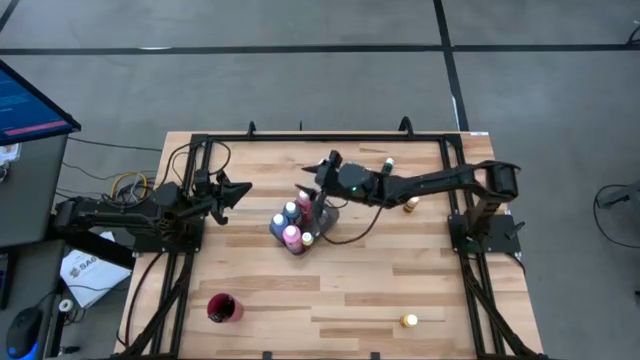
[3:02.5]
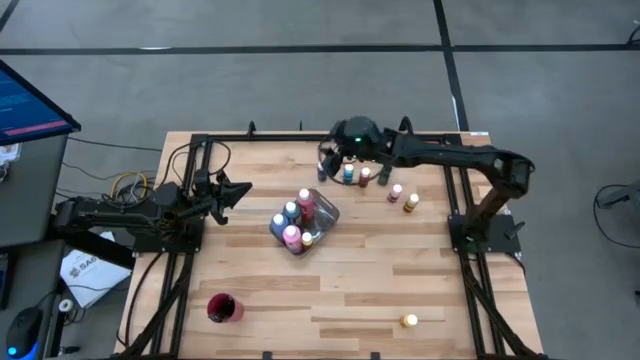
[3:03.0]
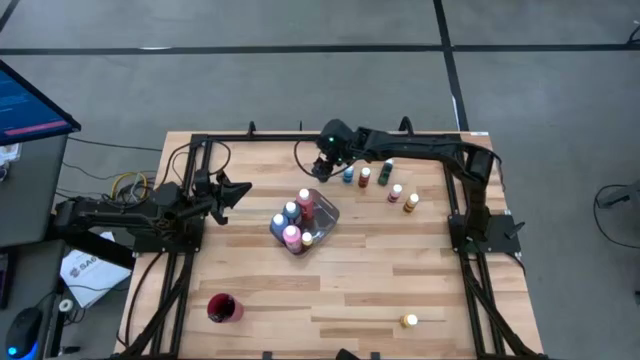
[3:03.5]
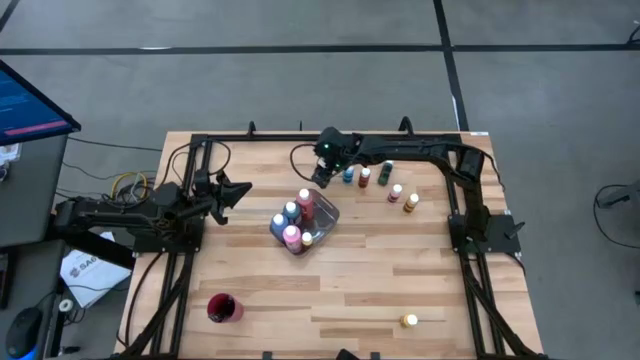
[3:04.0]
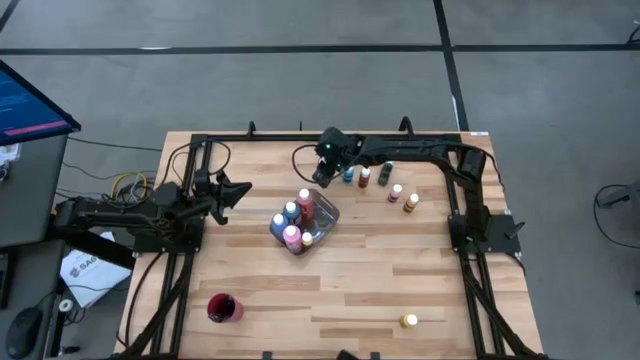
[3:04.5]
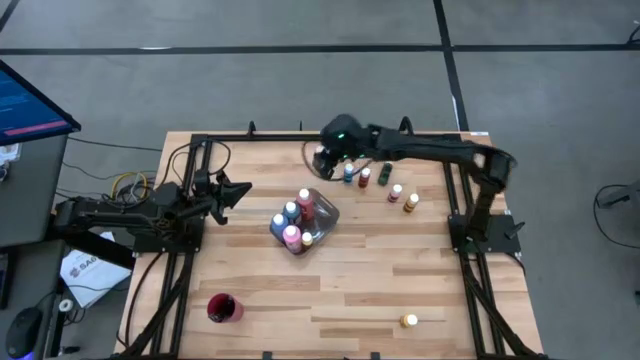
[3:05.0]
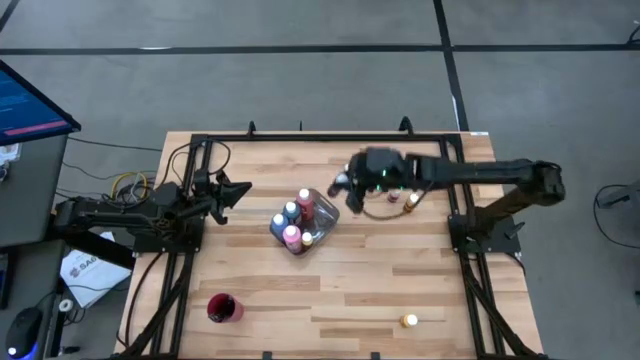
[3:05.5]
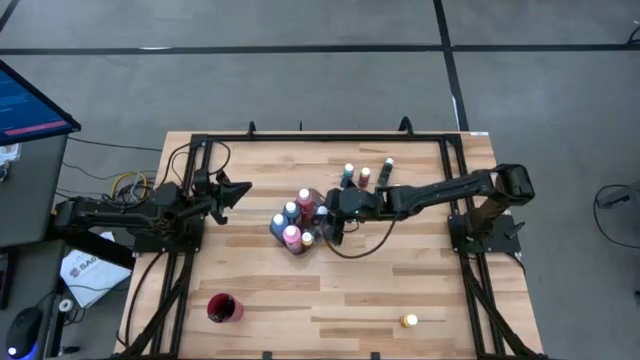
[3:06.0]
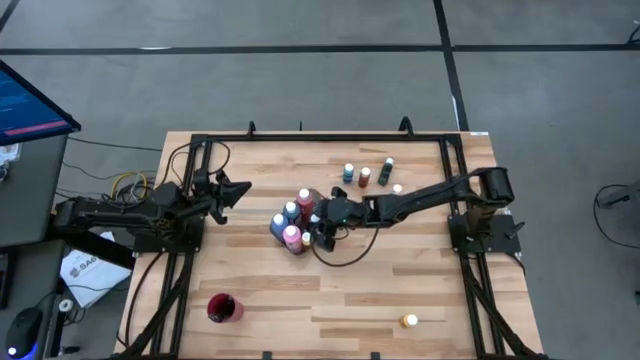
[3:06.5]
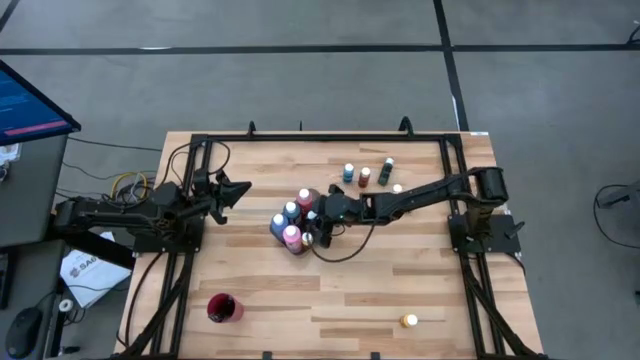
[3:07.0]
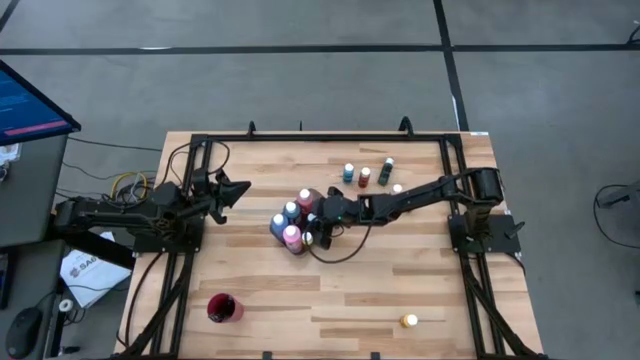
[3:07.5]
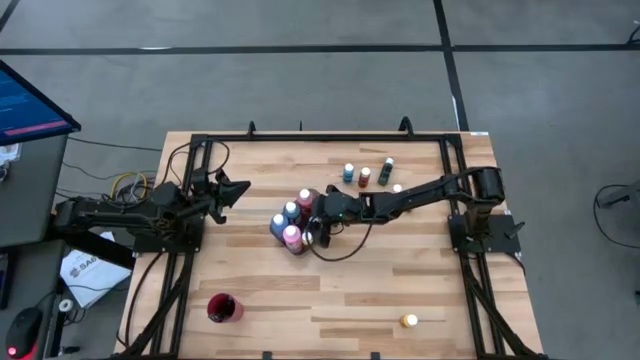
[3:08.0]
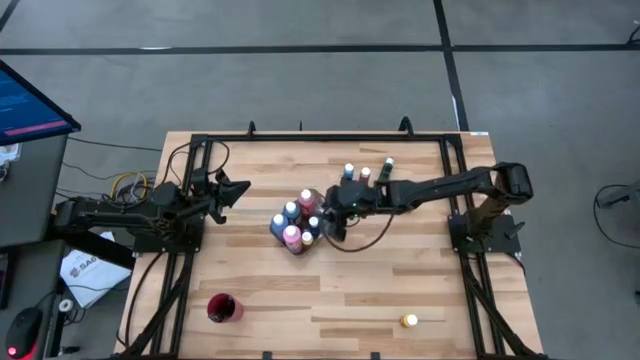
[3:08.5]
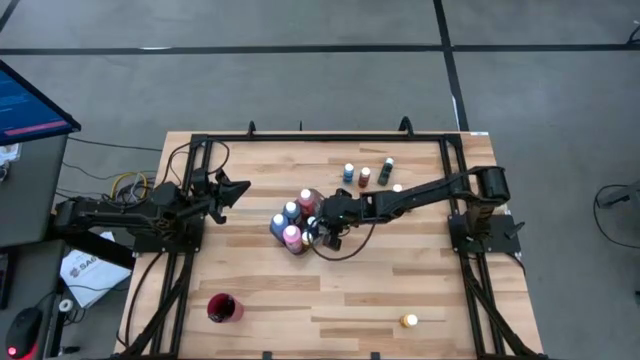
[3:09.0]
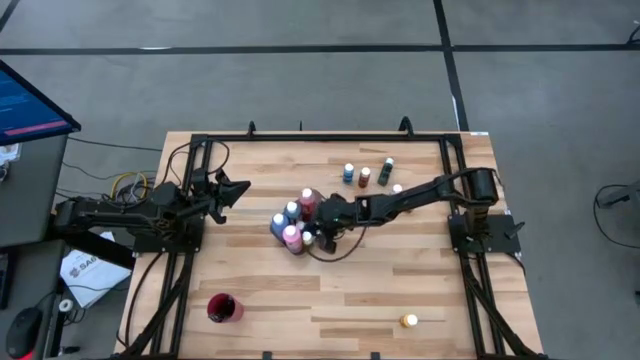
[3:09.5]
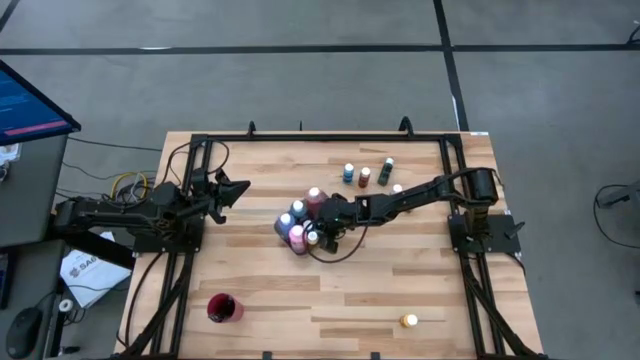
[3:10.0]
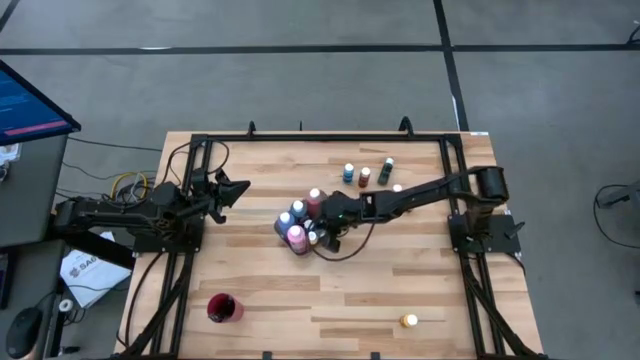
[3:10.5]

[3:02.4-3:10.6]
Task: Pick & Place Paint Supplies
Put the small blue paint bottle into the black bin

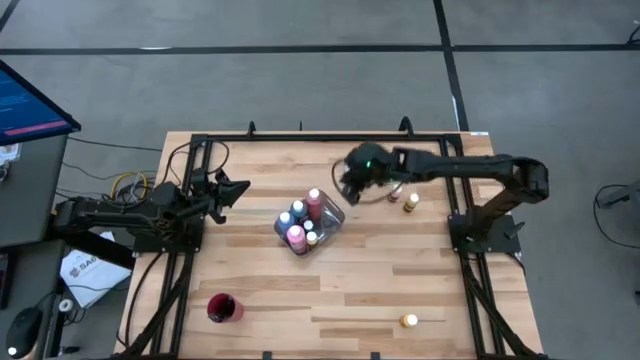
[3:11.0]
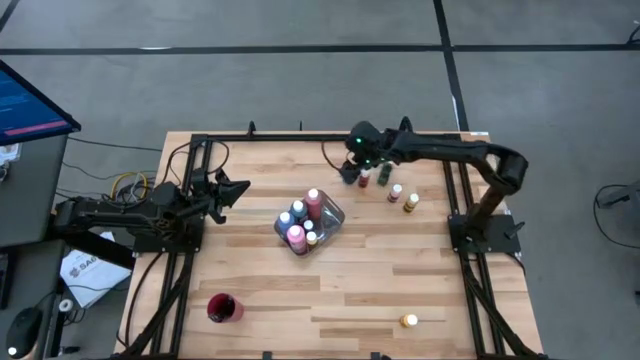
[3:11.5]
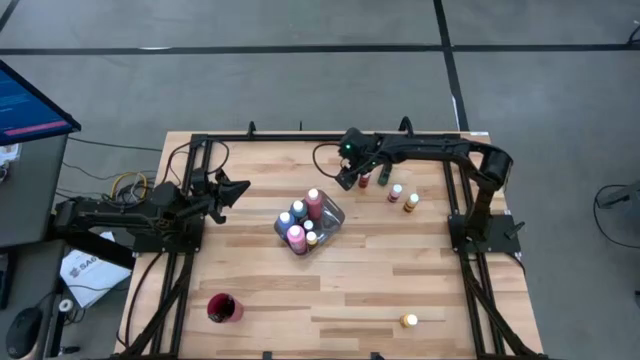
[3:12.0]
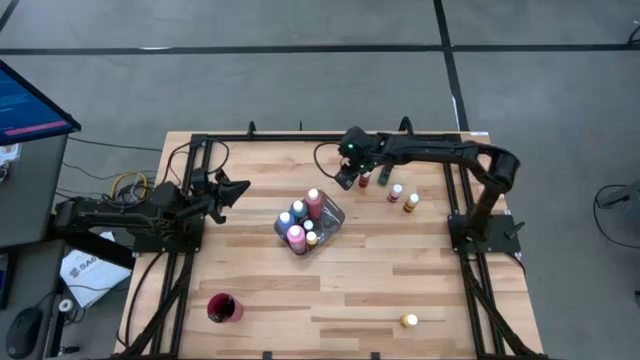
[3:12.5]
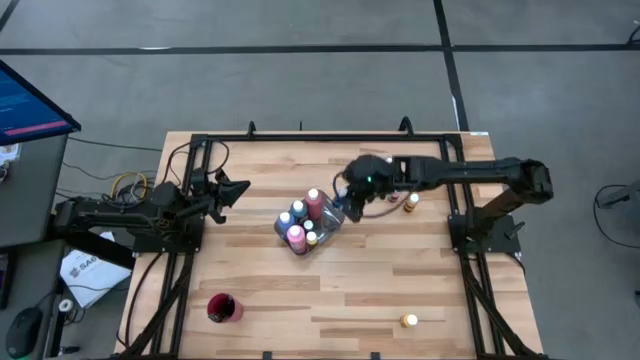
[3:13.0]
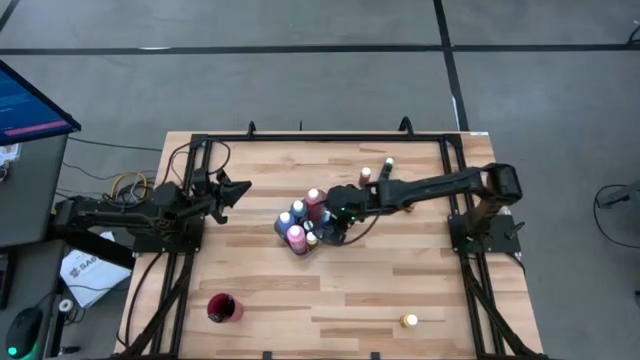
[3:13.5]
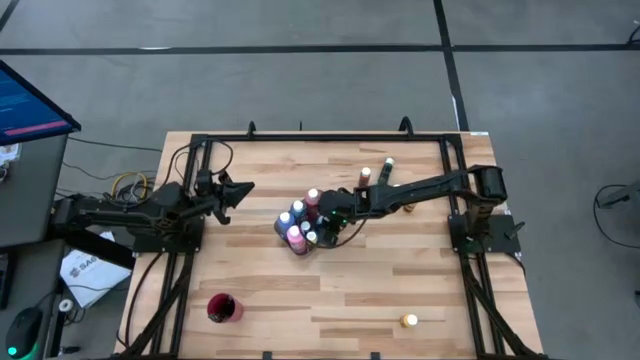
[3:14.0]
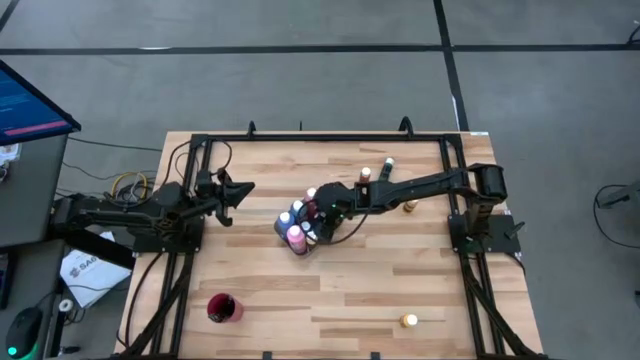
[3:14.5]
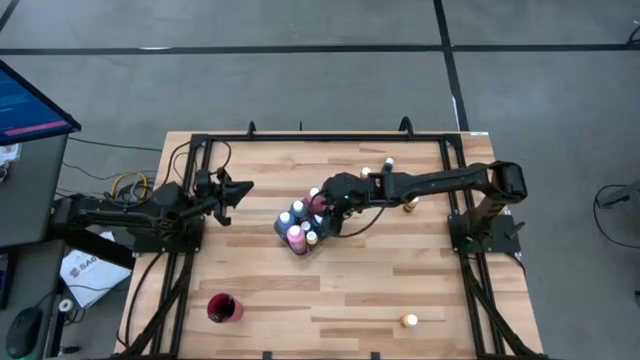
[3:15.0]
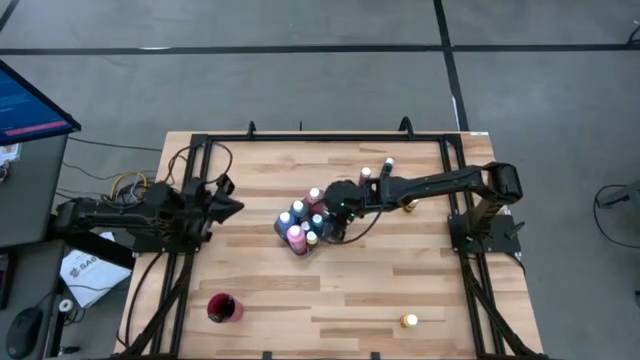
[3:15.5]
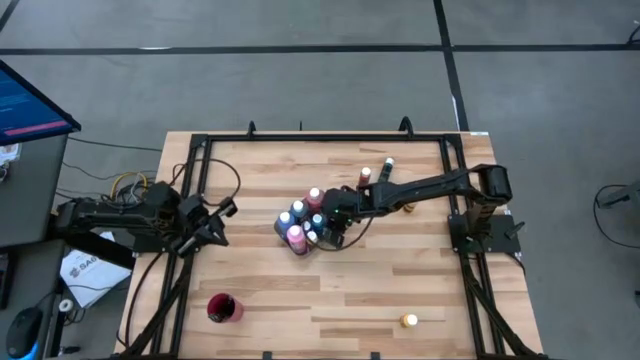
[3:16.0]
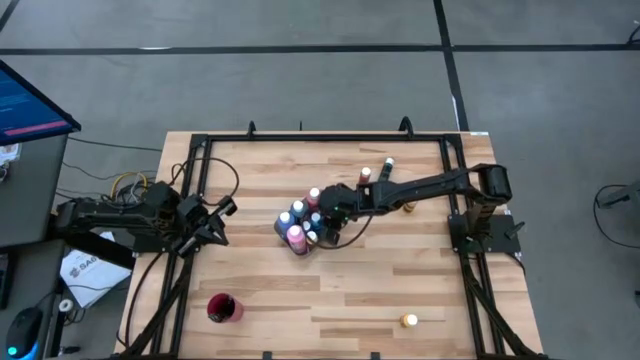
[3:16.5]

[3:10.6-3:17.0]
Put the small light blue paint bottle into the black bin

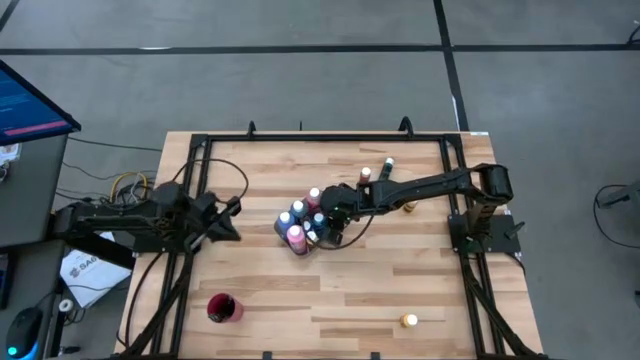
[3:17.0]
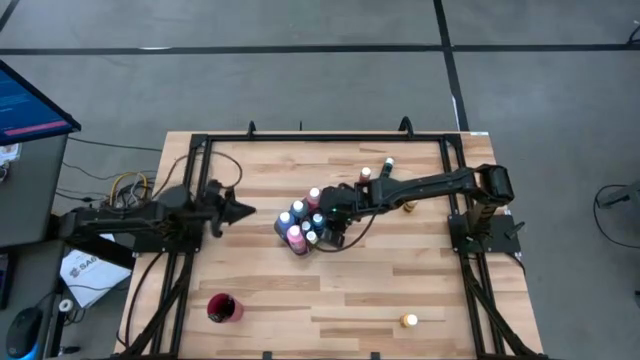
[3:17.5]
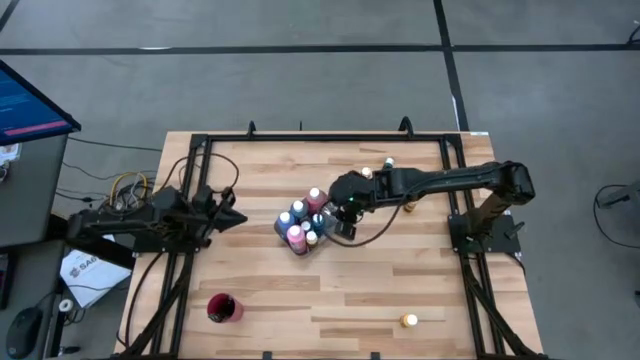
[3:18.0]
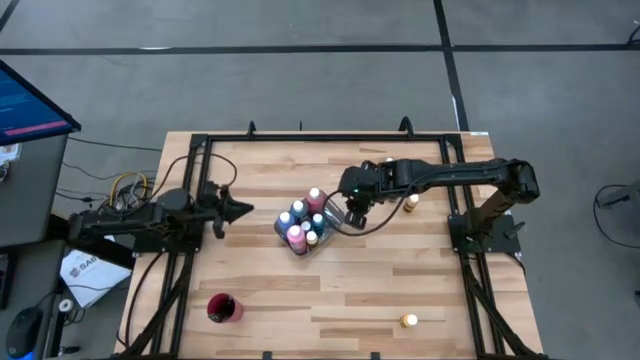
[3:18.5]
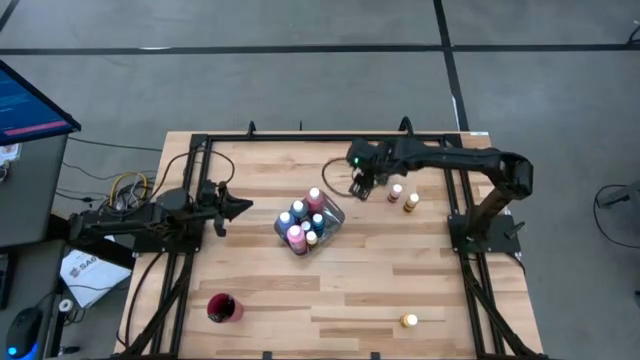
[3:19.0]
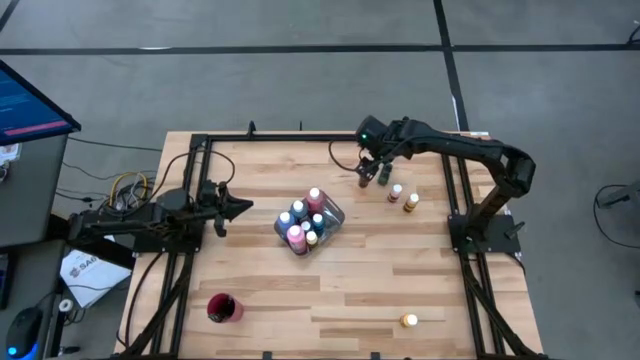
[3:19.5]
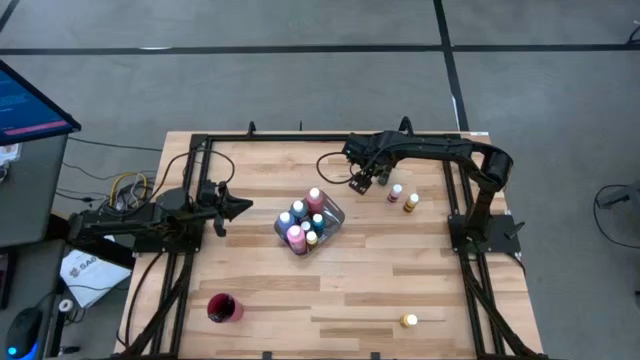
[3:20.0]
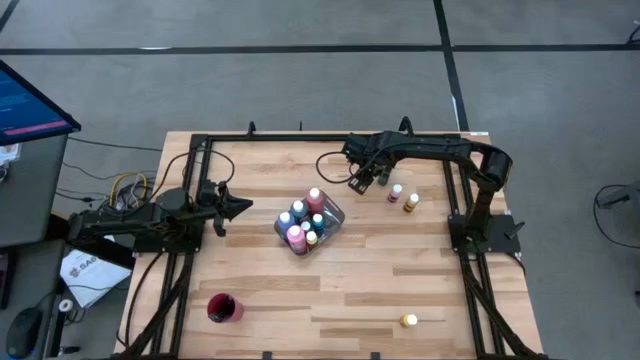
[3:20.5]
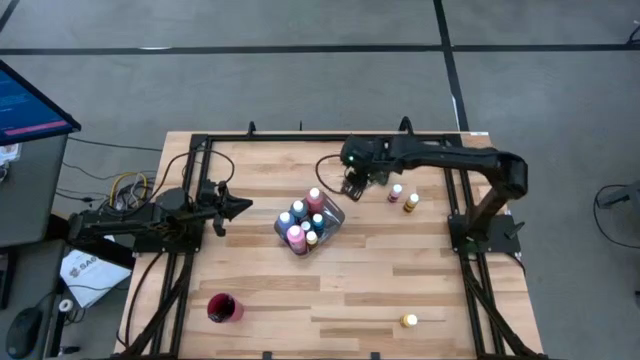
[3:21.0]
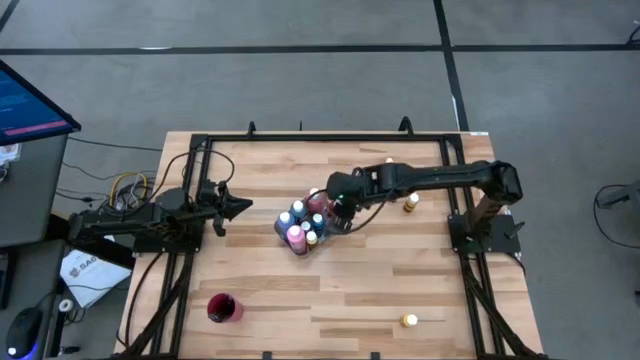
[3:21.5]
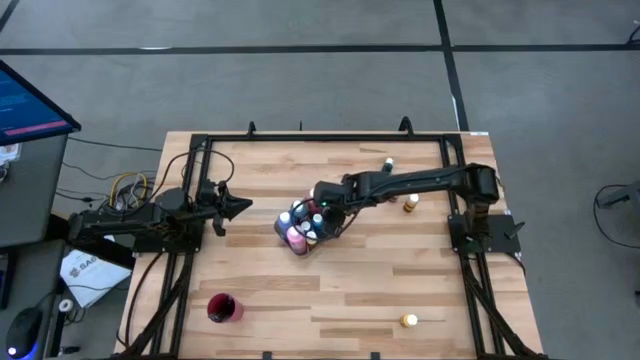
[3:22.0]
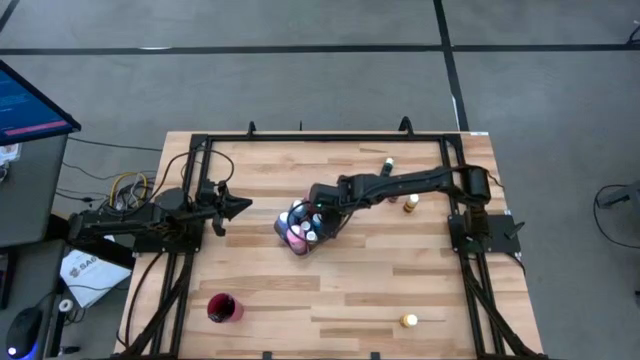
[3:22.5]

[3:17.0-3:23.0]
Put the small red paint bottle into the black bin
